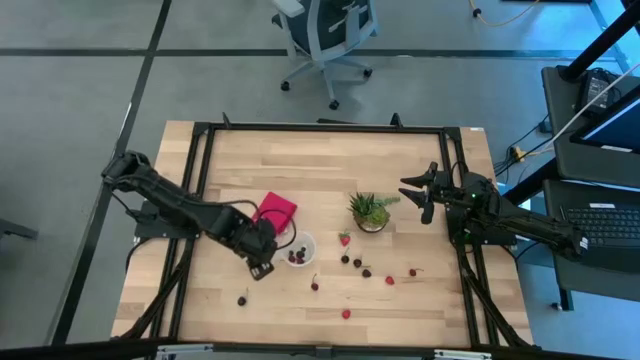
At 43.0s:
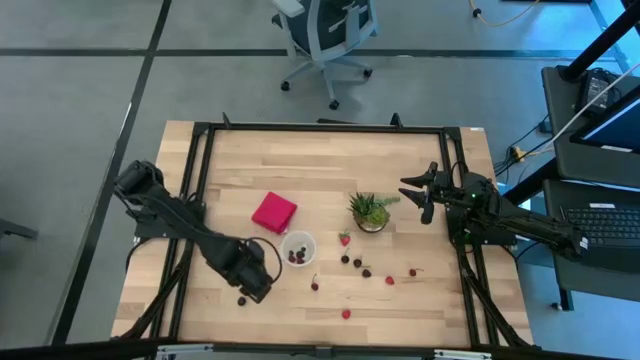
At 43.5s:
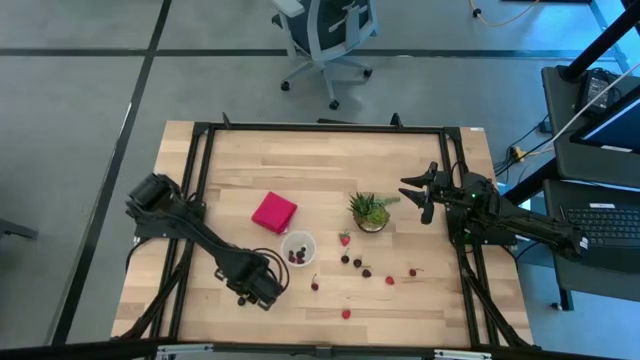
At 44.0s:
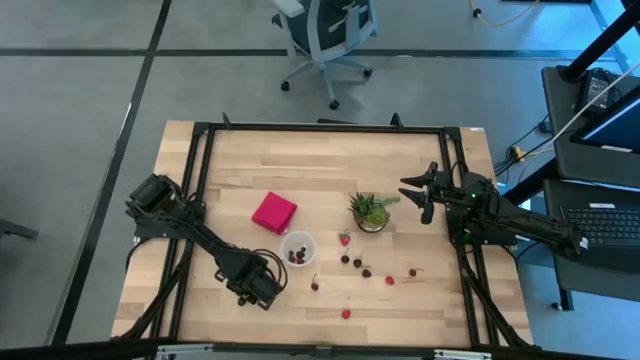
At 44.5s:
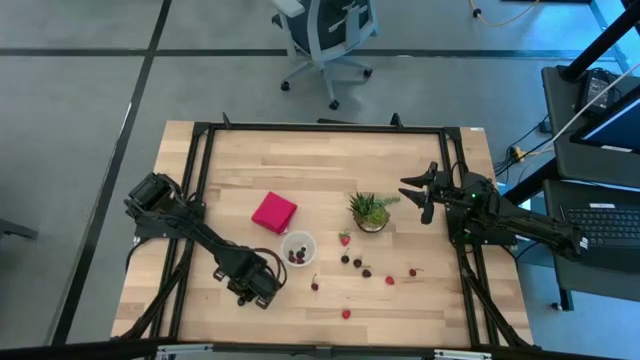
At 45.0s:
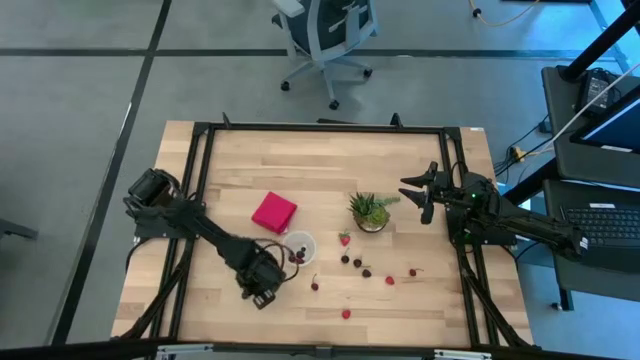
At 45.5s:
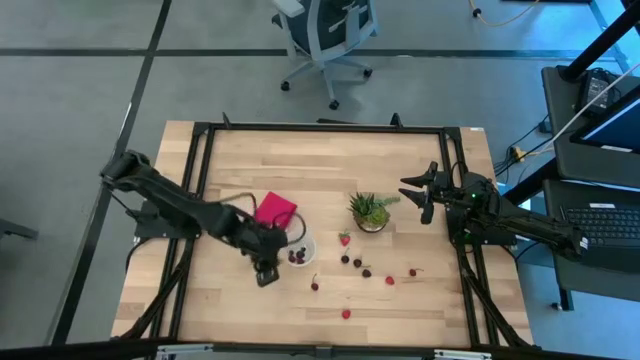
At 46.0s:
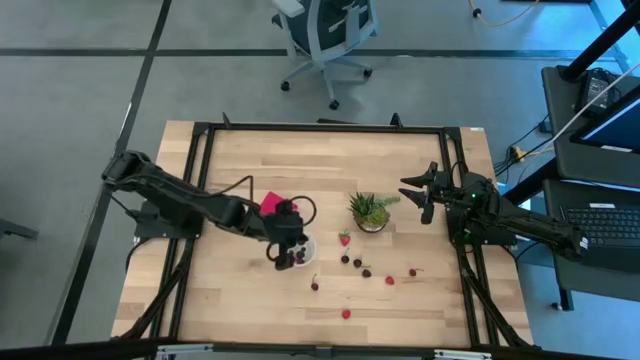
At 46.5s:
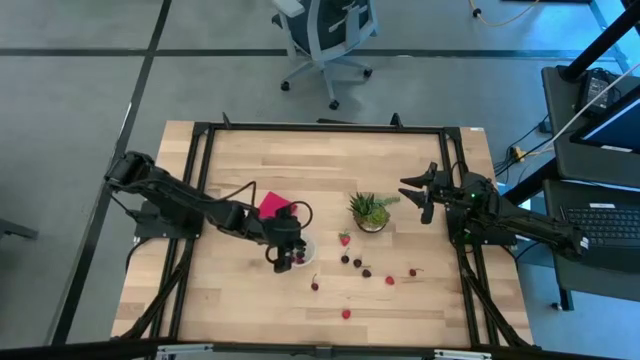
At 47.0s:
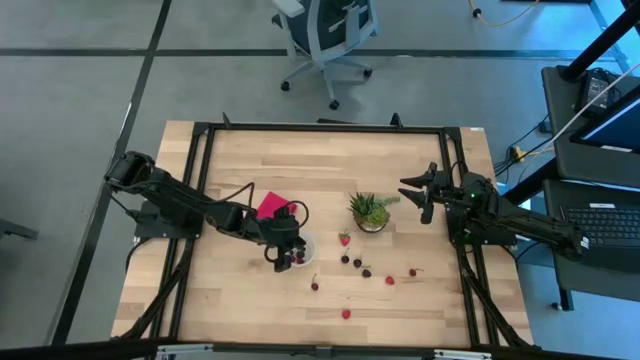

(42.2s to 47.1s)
Task: Pick and placing Produce into tupperware
Put the black cherry into the container

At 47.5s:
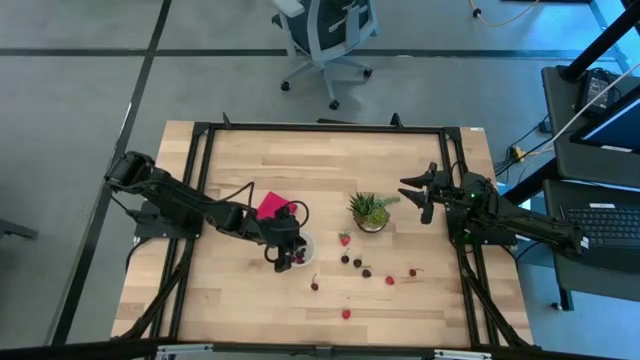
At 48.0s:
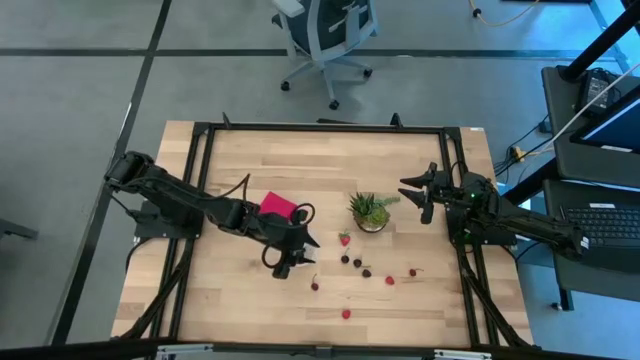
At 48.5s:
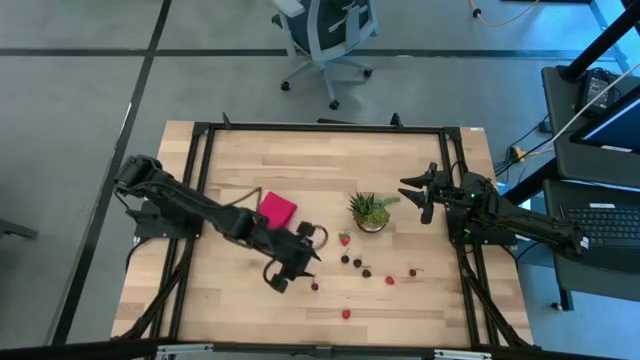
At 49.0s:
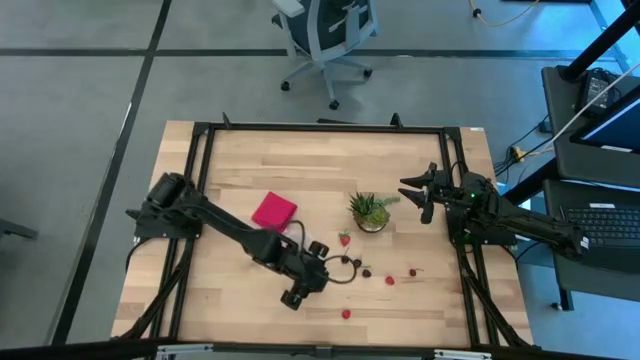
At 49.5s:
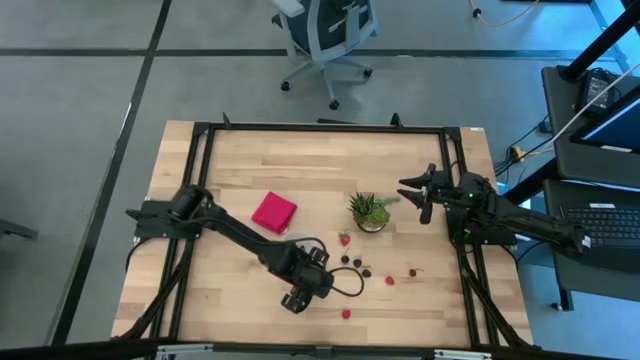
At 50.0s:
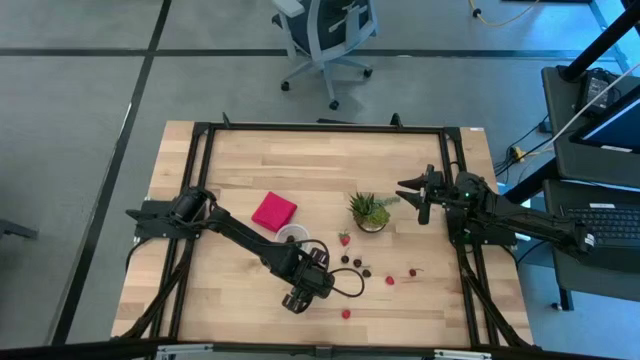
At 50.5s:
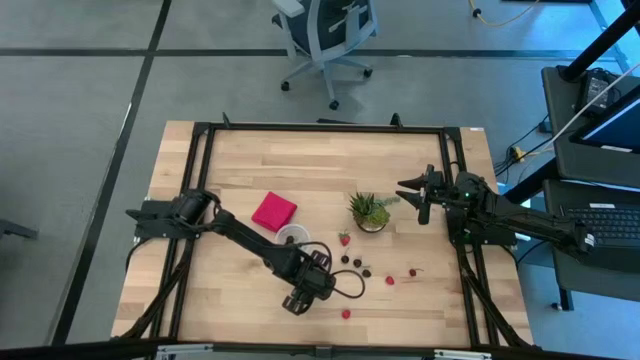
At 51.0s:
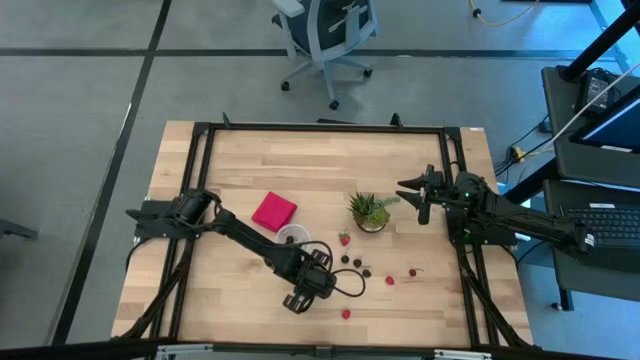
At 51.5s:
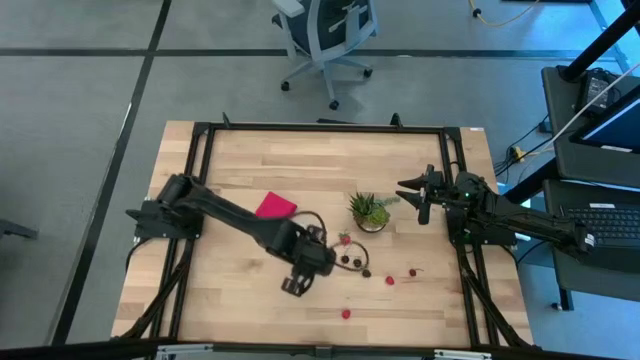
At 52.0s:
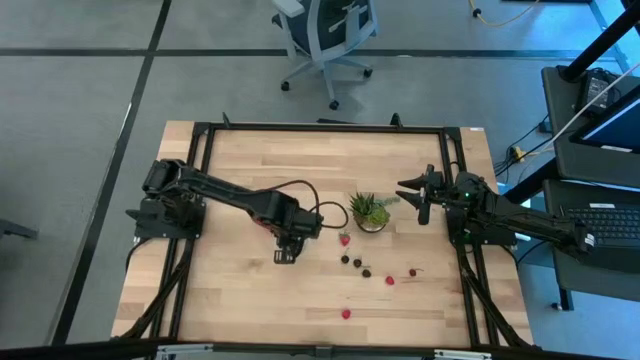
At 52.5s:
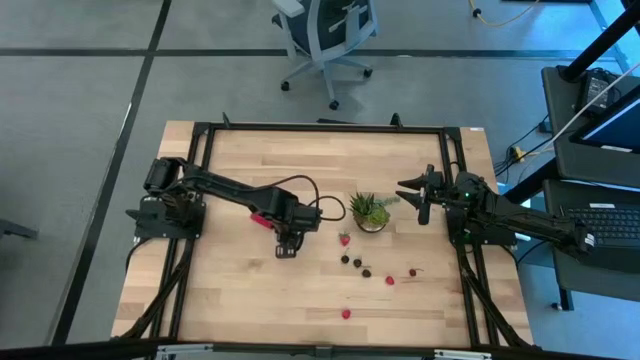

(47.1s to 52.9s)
Put the red cherry into the container

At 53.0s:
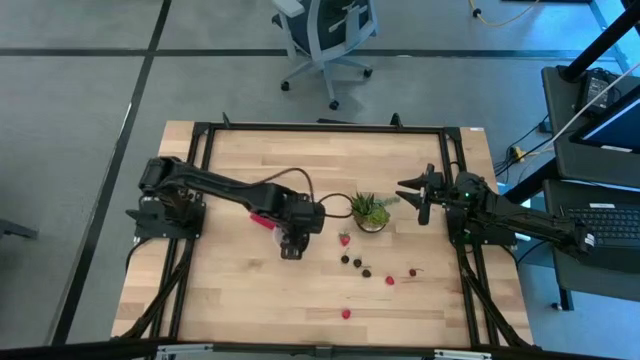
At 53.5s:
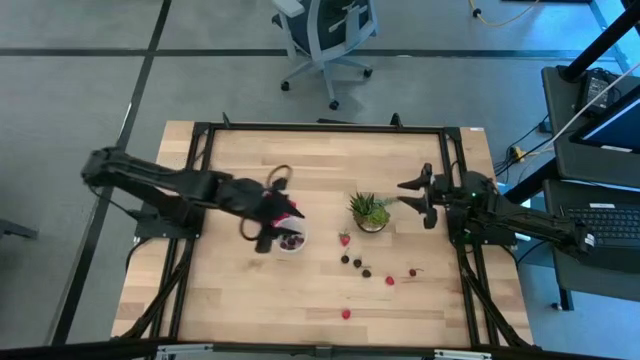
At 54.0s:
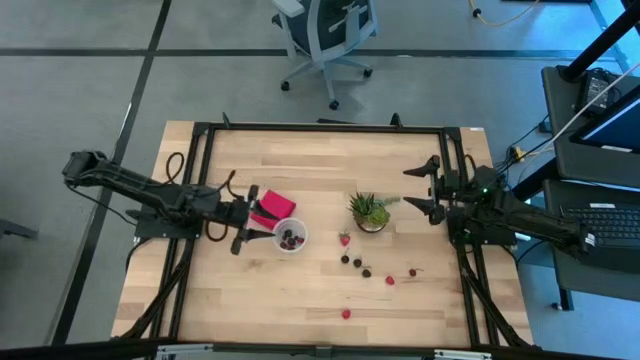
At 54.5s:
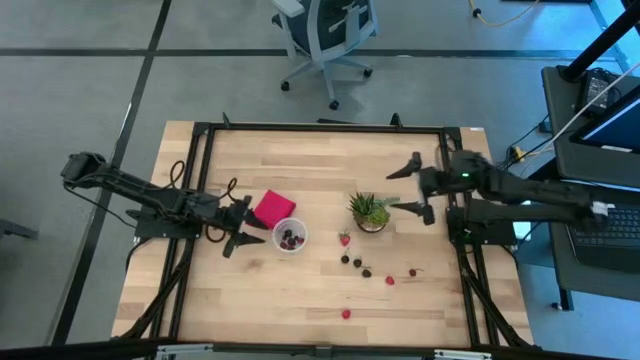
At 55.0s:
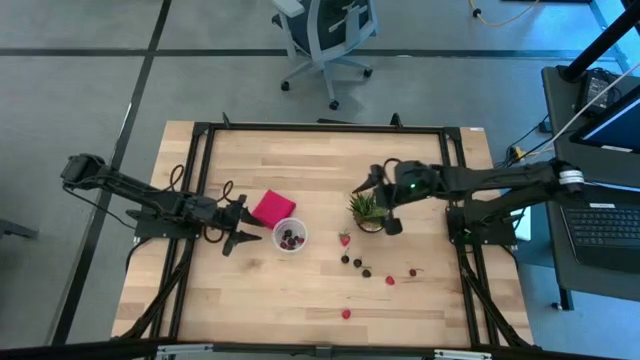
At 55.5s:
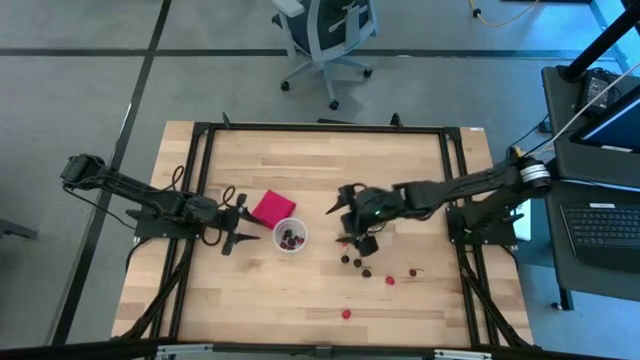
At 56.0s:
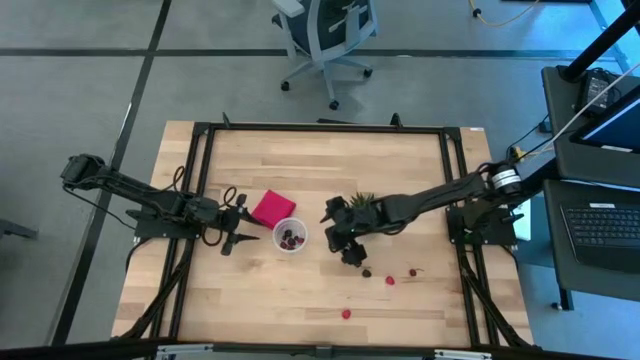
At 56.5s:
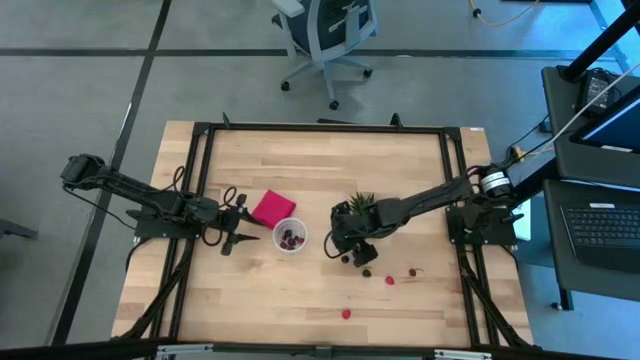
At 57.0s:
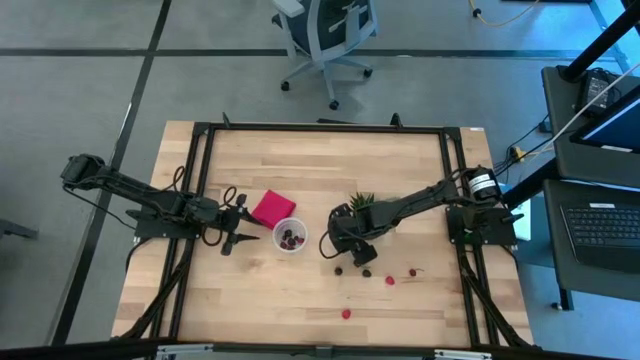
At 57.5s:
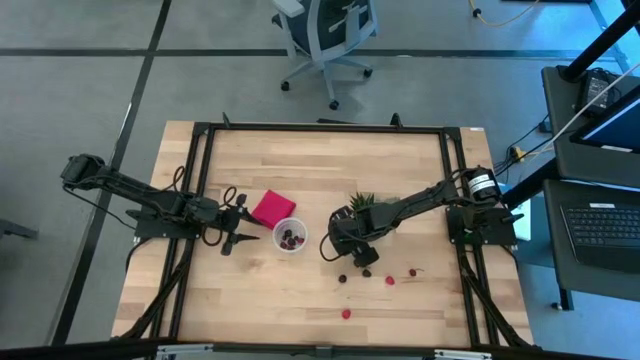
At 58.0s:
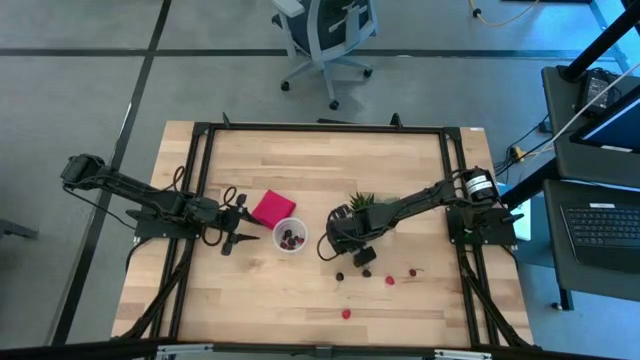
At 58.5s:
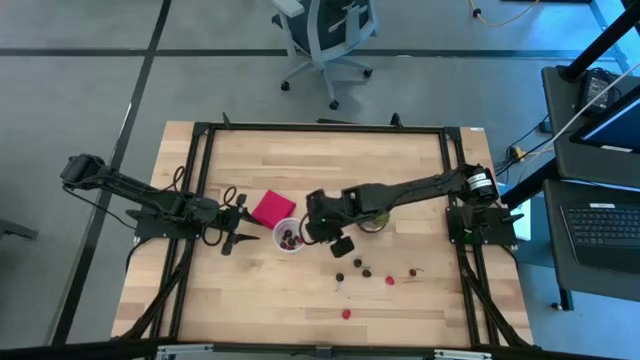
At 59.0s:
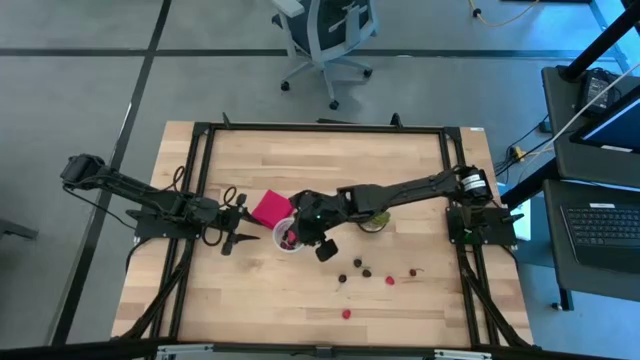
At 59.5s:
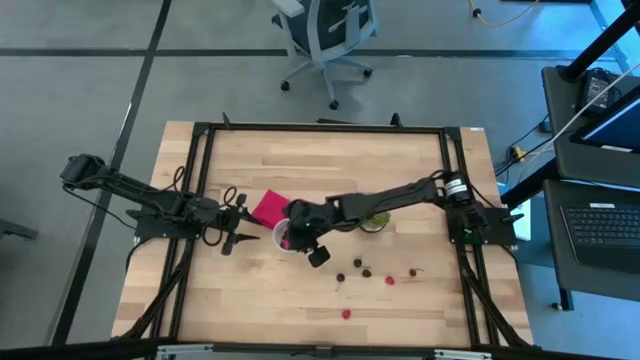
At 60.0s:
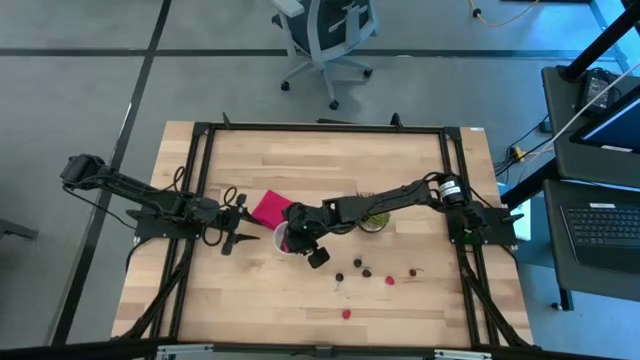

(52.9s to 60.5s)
Put the red strawberry into the container

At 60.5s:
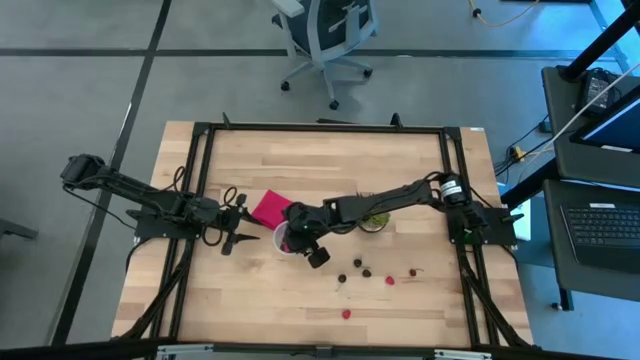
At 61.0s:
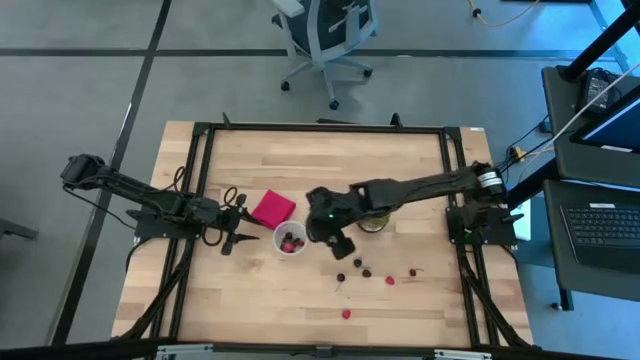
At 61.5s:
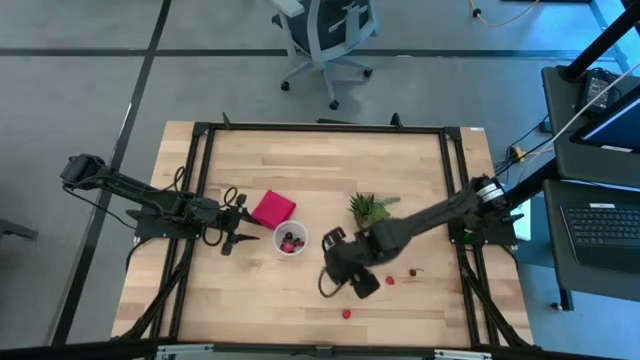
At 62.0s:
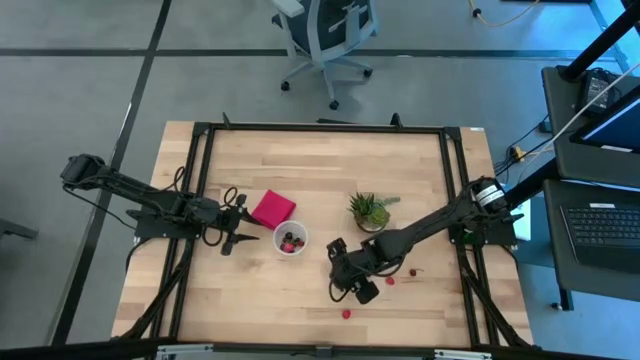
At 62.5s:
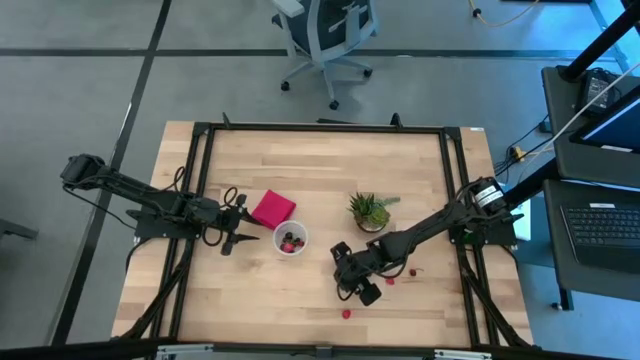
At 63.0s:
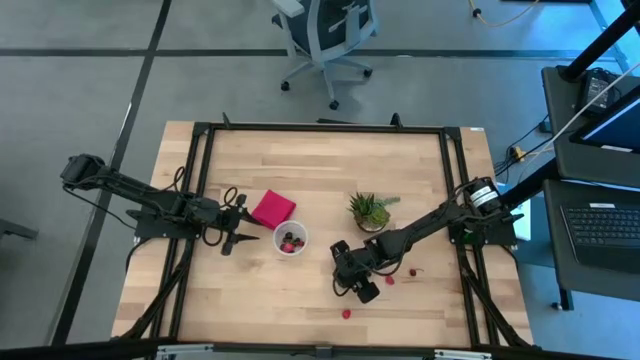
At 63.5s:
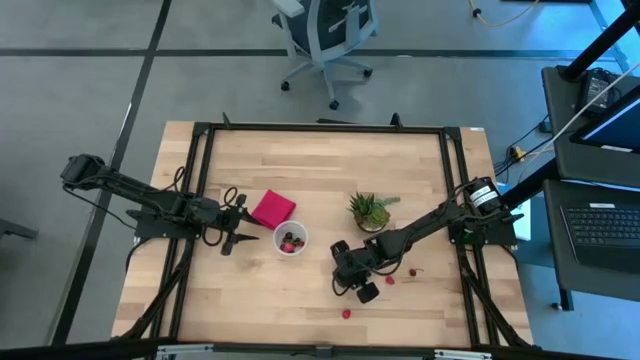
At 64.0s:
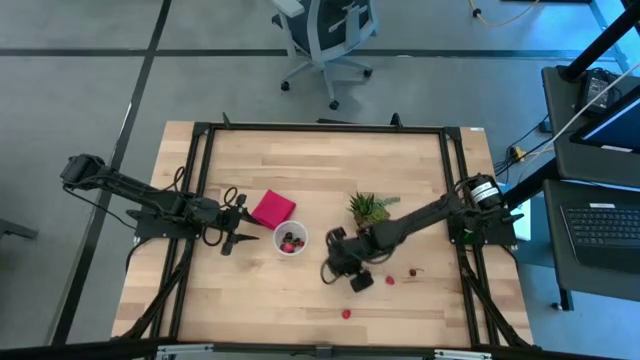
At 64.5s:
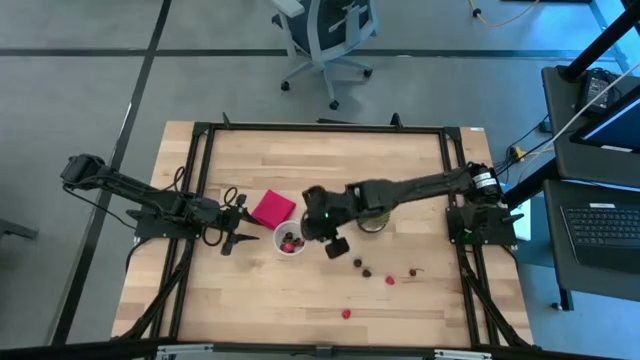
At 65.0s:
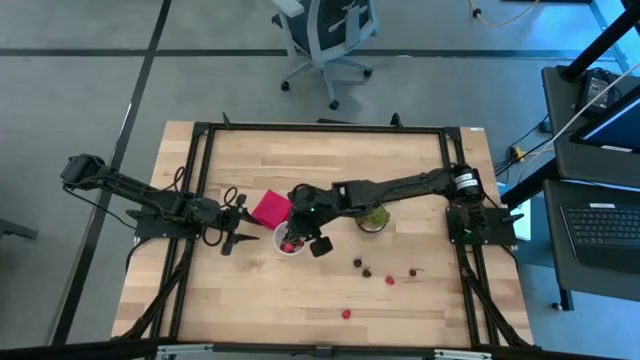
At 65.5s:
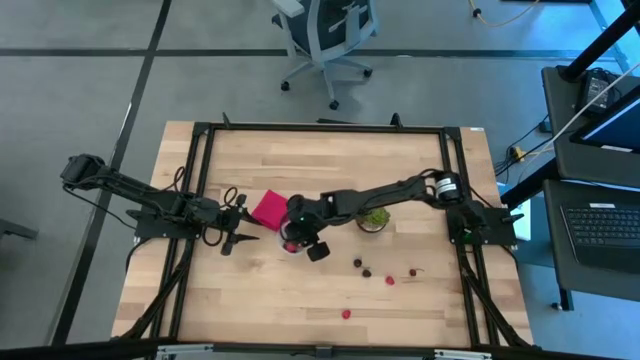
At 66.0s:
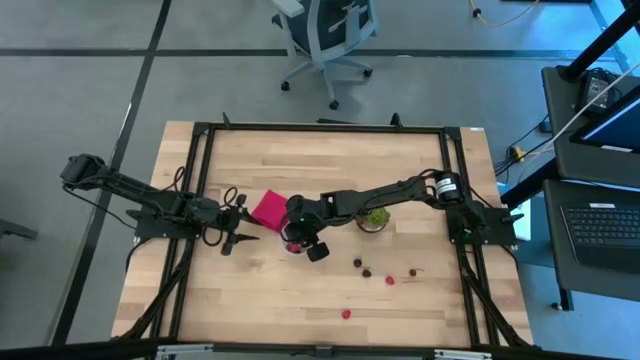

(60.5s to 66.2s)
Put the black cherry into the container
